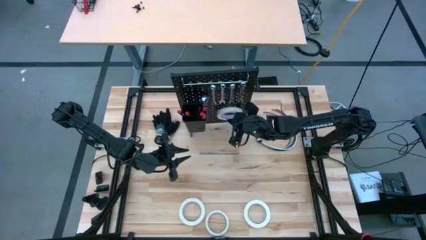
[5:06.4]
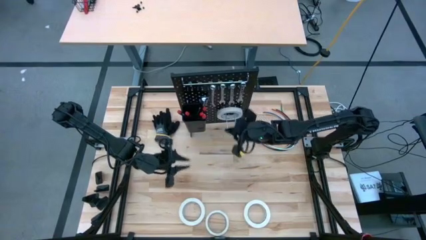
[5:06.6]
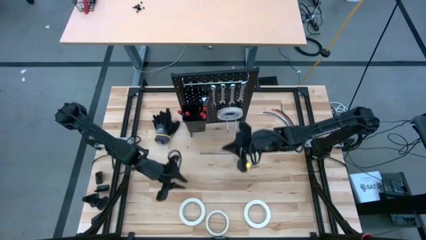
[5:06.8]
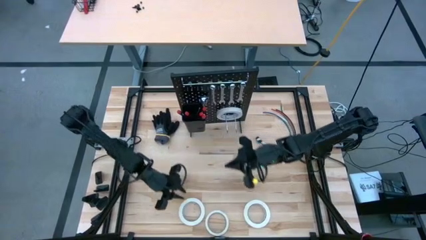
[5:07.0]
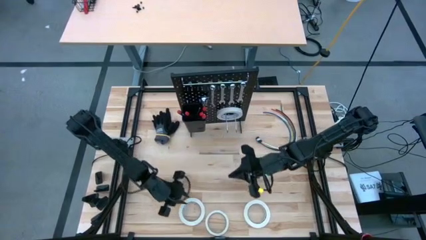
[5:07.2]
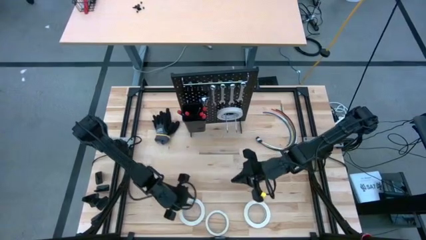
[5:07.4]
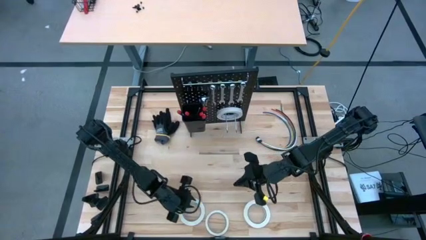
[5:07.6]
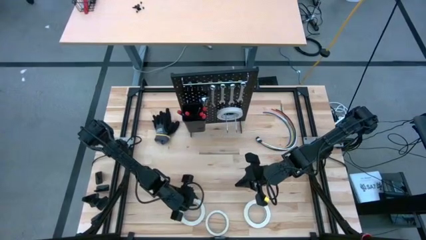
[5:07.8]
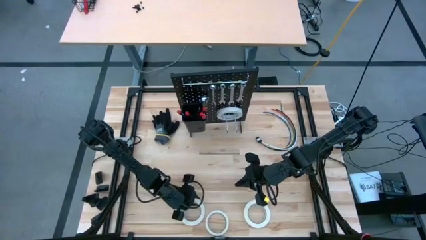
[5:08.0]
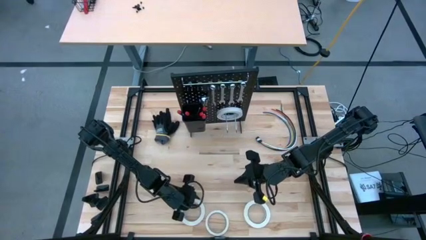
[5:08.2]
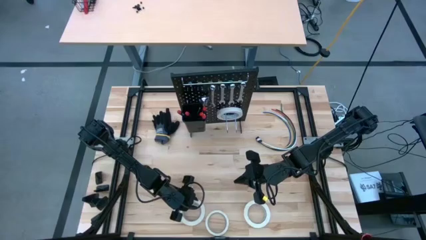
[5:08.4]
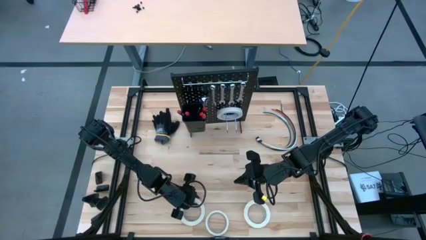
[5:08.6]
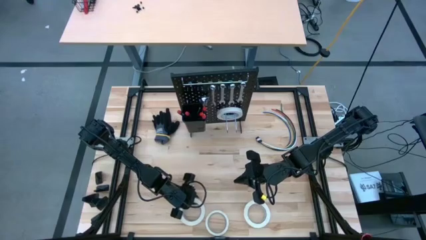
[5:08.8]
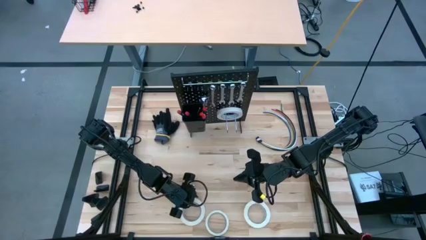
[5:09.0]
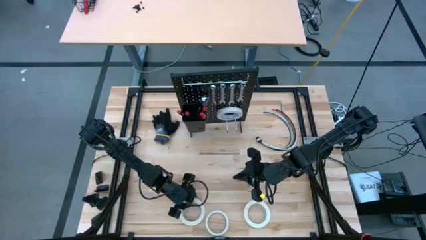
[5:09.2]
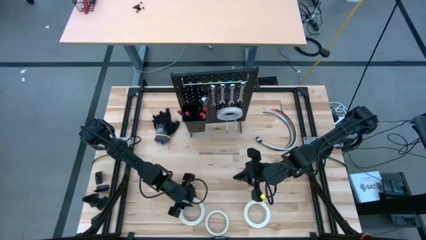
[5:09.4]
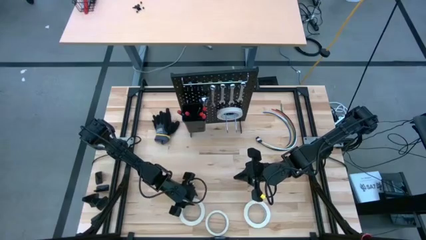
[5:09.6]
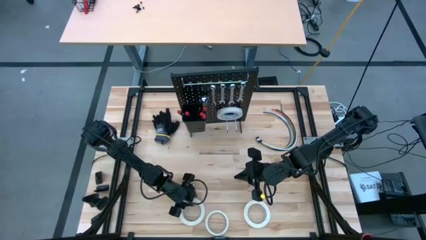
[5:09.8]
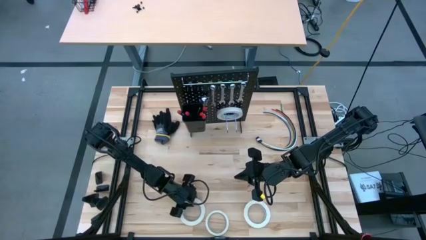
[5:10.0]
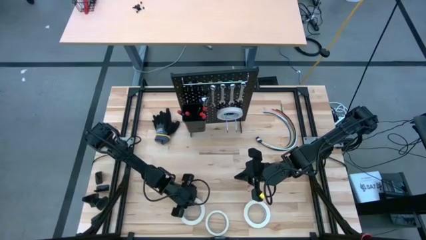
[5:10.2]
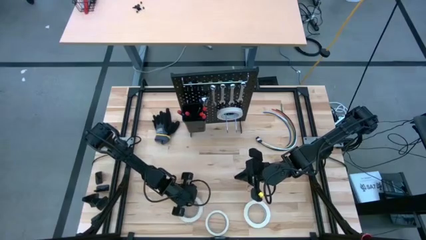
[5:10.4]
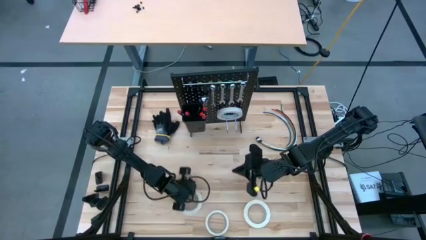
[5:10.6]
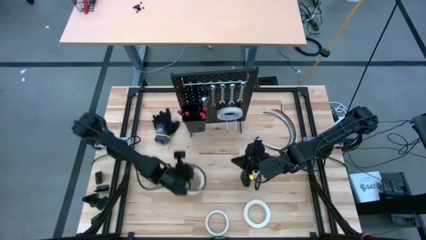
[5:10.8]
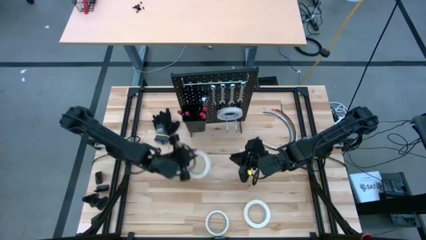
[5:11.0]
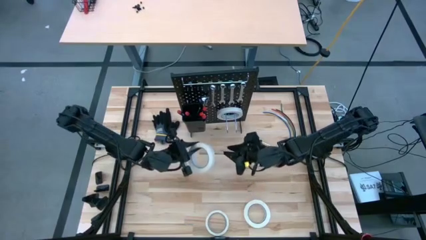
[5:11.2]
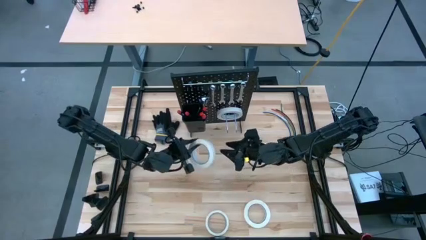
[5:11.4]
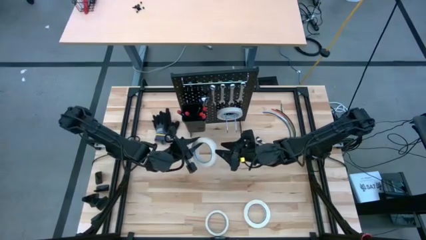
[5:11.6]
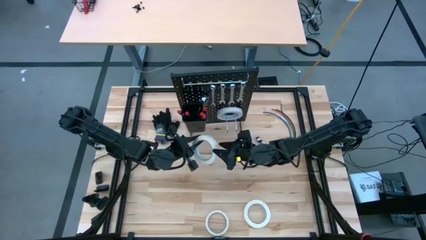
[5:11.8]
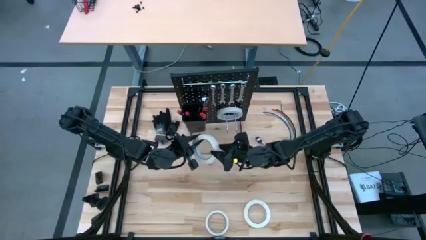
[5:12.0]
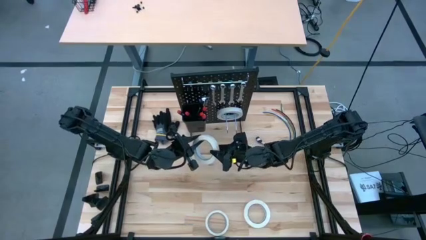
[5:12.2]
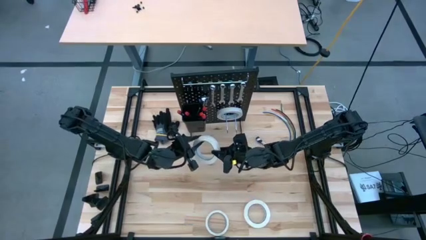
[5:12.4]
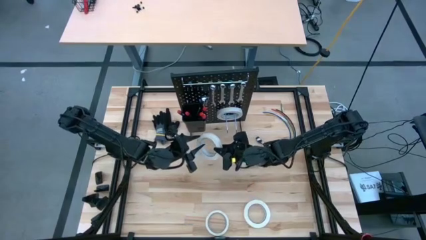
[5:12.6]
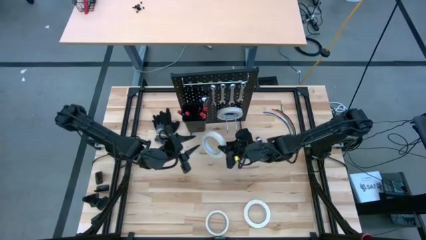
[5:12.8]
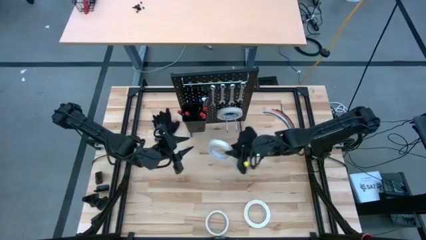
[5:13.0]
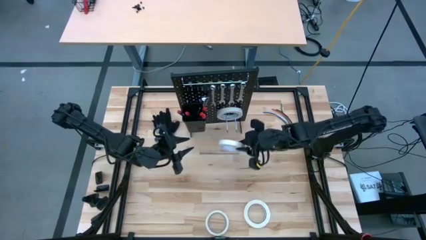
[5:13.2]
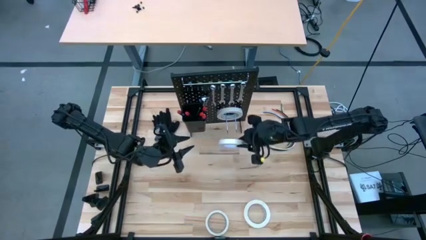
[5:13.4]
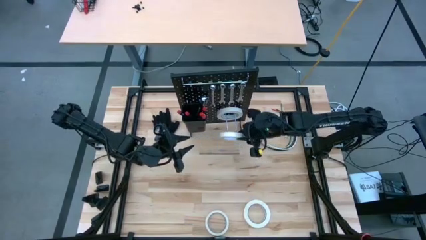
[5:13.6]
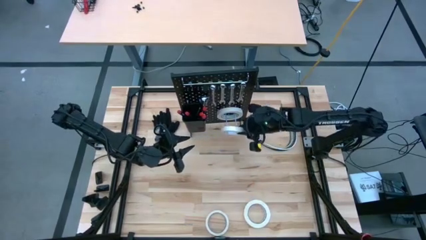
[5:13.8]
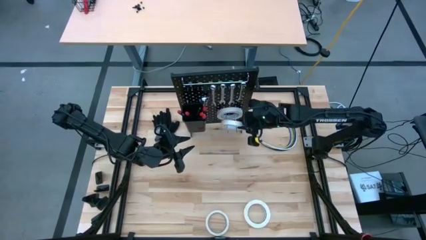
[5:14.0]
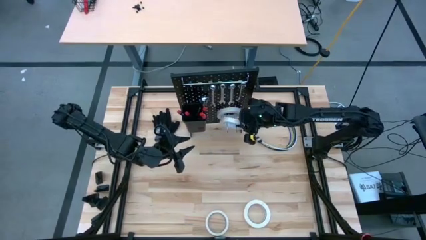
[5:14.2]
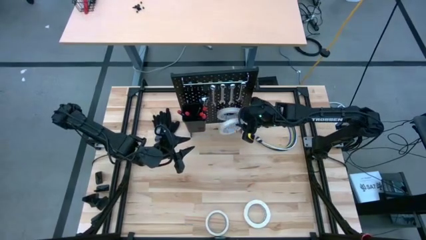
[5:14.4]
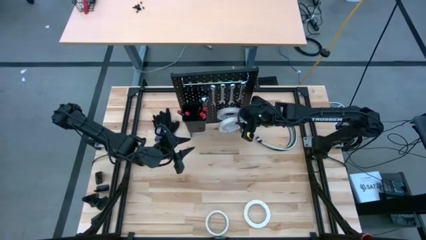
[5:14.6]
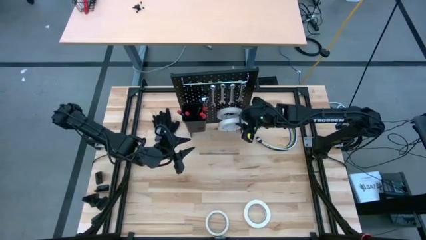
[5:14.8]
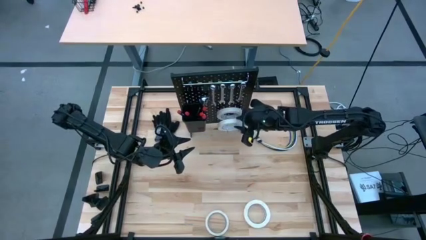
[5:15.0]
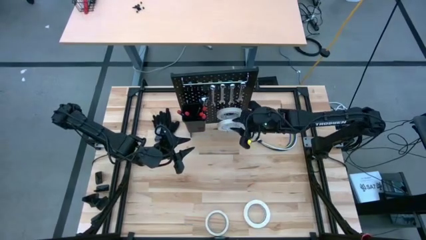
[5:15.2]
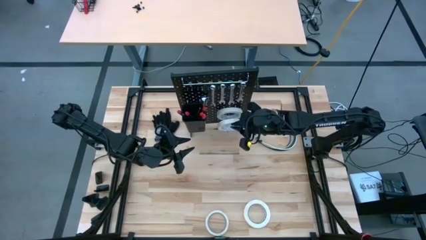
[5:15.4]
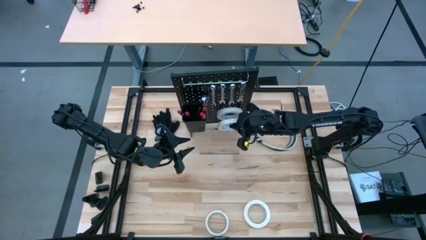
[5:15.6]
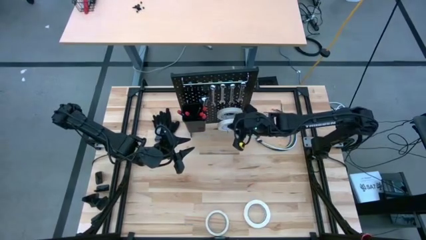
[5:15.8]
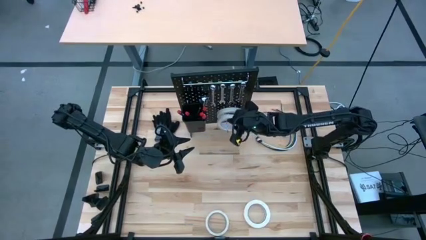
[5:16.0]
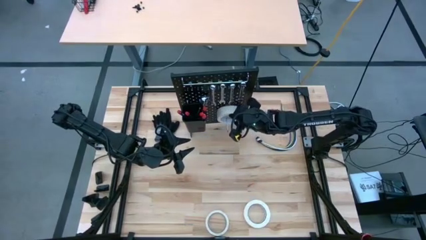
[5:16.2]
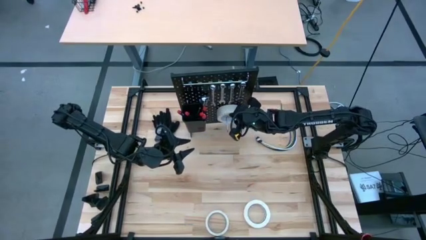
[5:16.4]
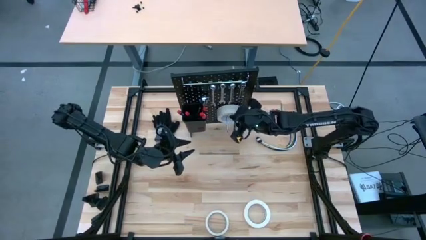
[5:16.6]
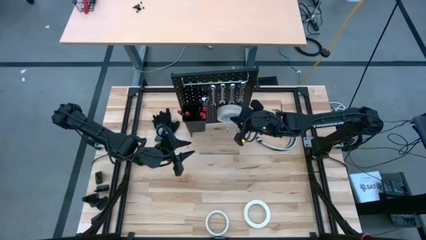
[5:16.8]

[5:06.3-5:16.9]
Task: Hang tools onto peg board
Hang the white masking tape on the peg board

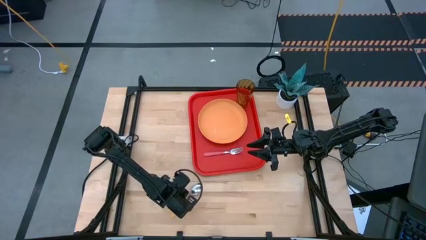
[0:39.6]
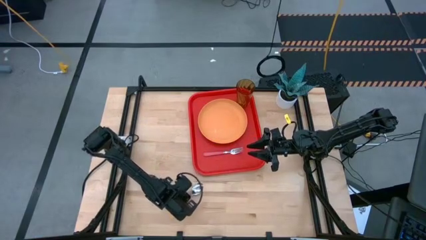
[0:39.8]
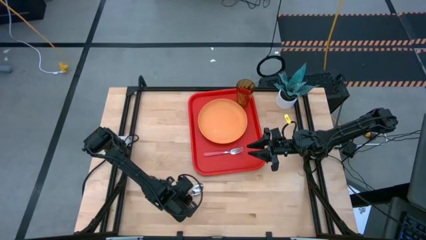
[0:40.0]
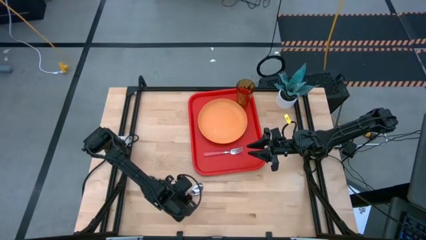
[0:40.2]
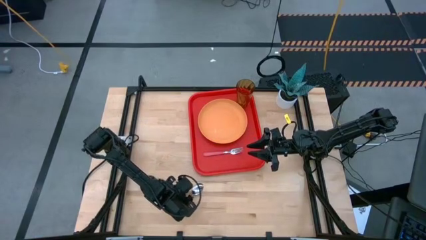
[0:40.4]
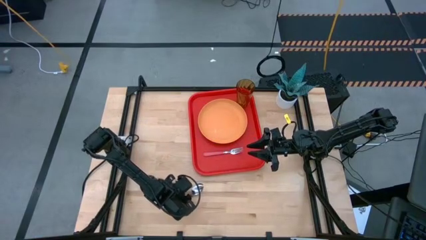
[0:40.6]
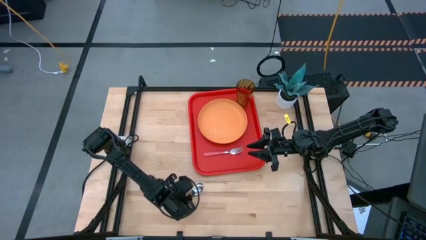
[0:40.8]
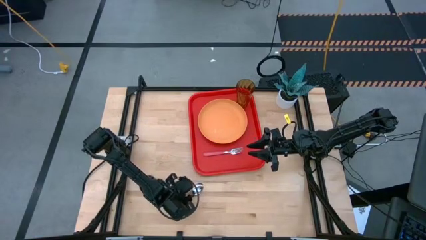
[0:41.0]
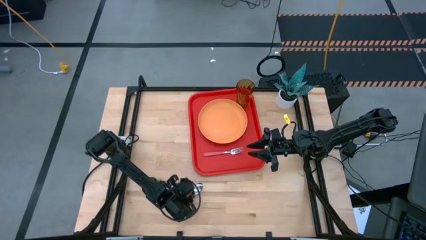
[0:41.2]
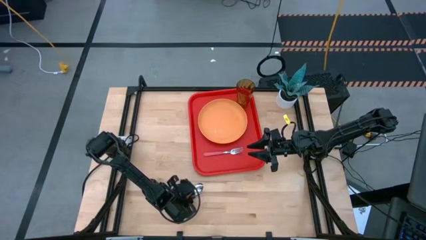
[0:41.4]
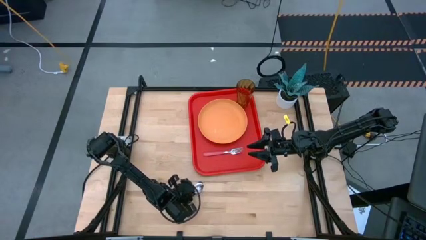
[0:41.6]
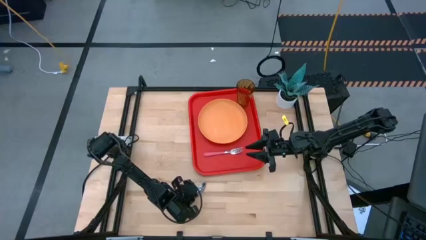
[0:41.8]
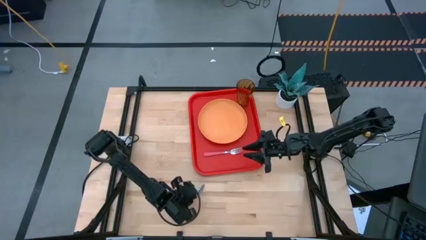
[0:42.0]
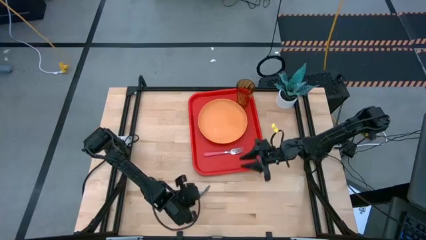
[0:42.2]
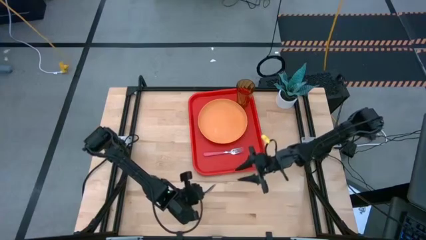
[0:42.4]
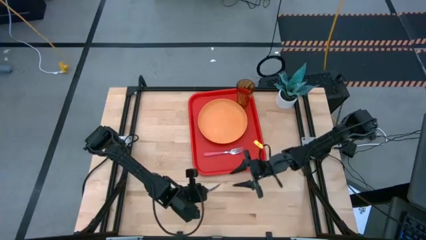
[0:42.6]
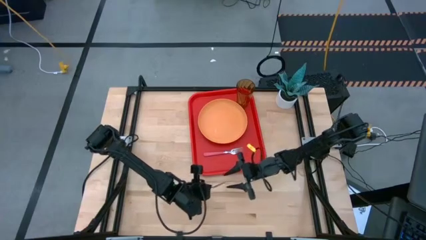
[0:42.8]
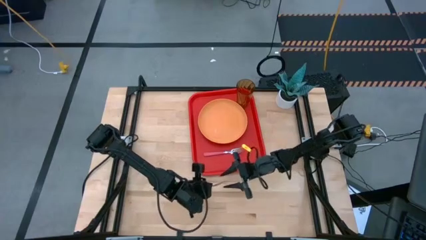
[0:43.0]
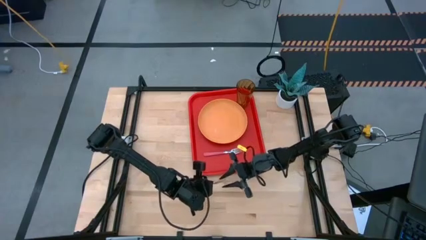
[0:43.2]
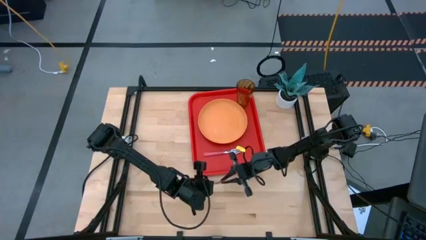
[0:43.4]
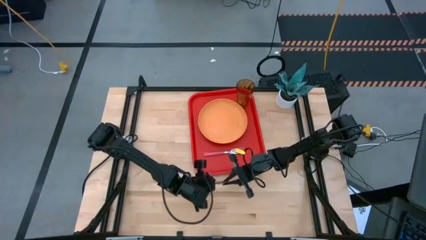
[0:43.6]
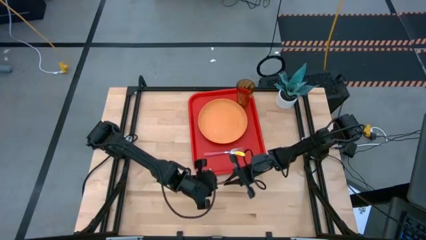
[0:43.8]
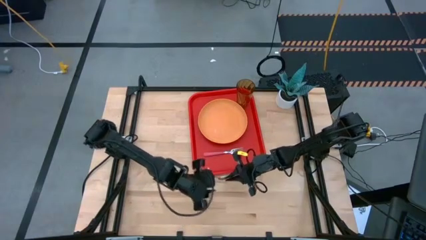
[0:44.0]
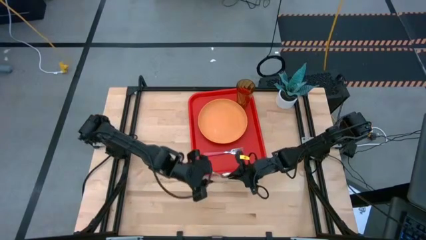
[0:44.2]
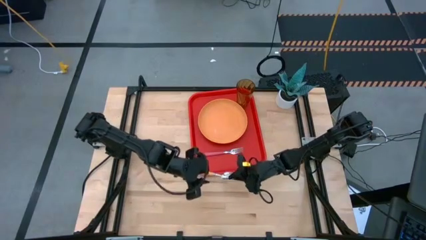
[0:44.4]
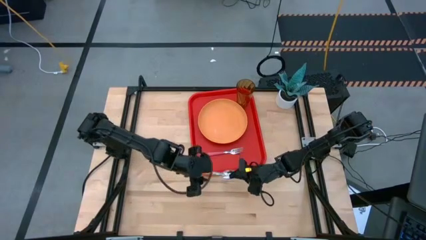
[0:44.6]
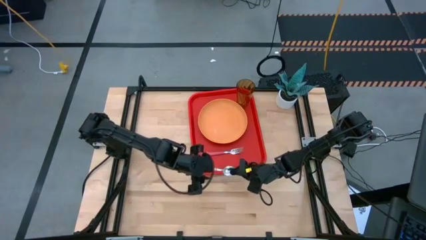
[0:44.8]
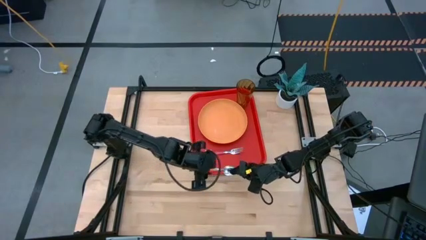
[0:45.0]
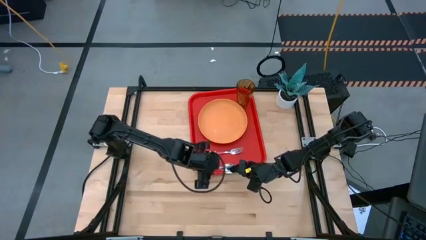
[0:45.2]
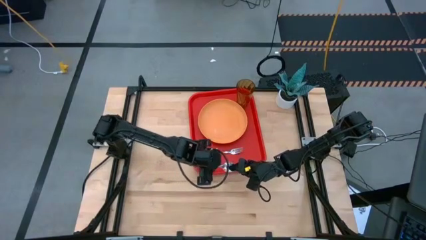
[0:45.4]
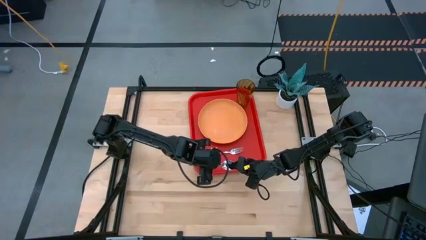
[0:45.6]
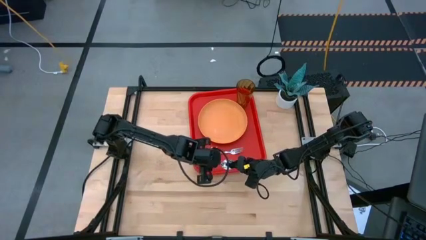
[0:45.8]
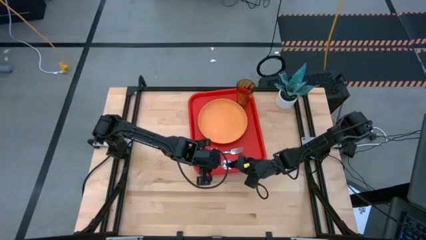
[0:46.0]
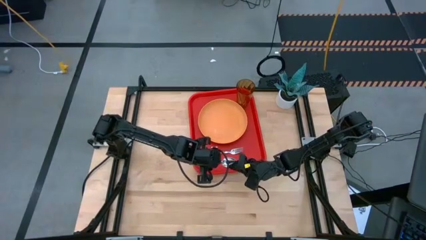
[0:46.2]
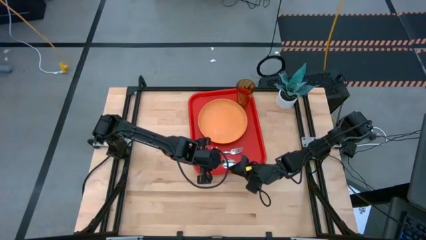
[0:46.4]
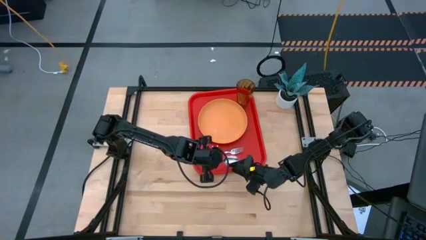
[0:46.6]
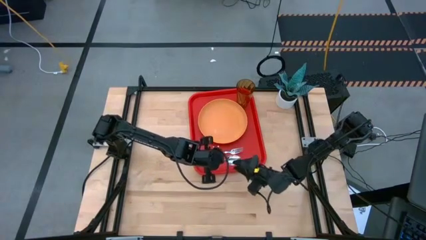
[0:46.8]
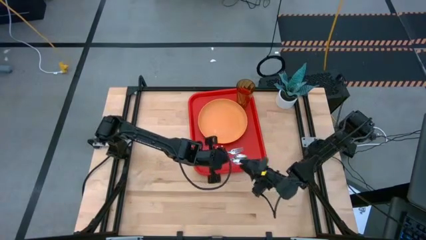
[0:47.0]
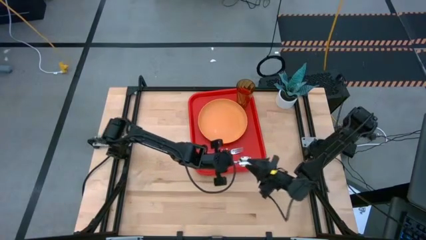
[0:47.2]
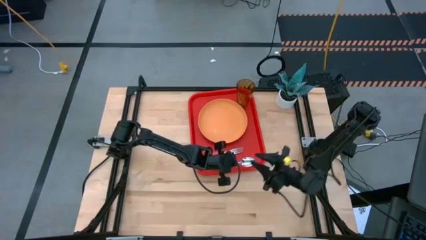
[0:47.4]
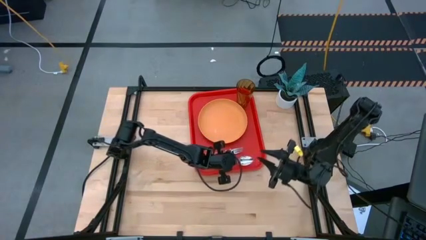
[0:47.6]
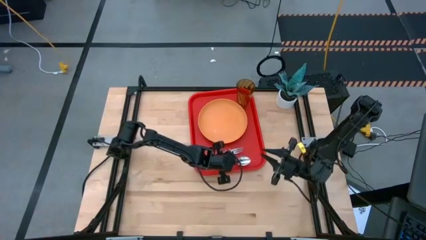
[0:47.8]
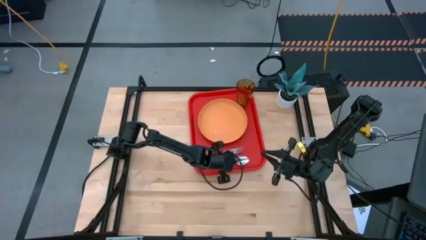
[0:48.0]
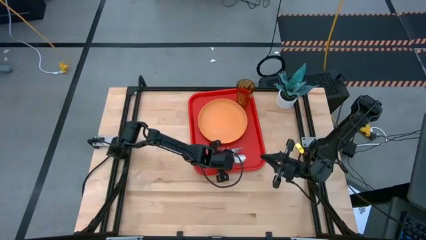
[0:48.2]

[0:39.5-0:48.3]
Task: Pick and place plate/cup/fork/spoon on tray
Put the yellow spoon on the red serving tray to the bottom of the pink fork
